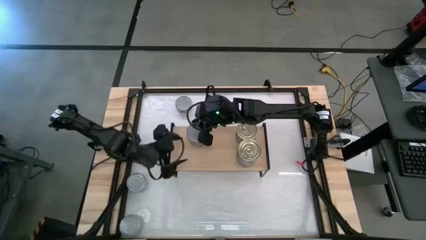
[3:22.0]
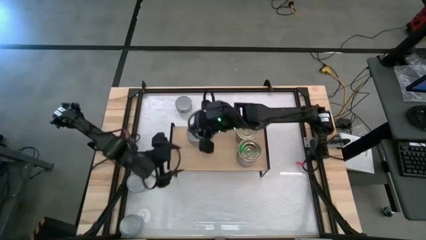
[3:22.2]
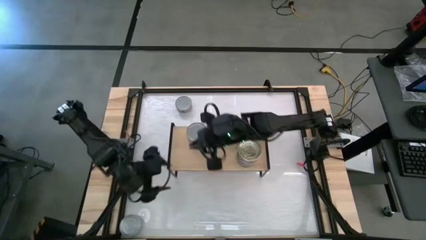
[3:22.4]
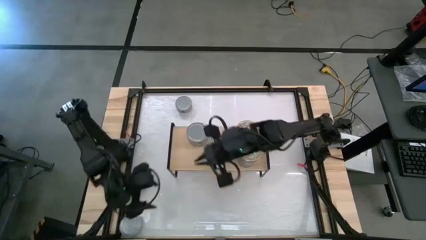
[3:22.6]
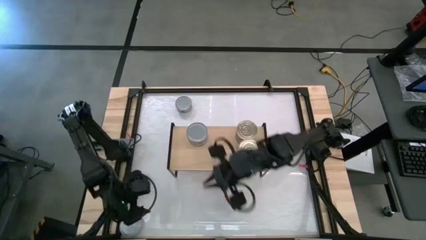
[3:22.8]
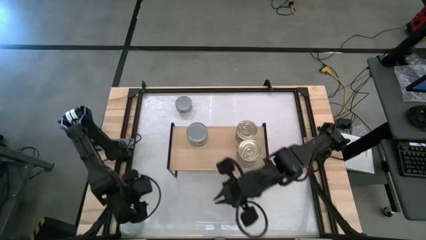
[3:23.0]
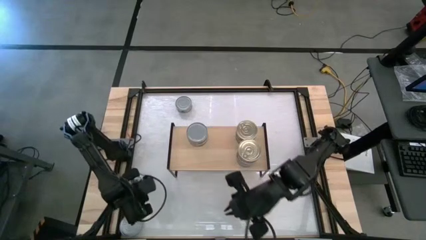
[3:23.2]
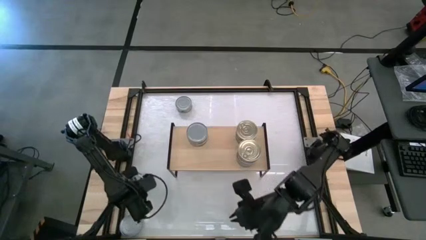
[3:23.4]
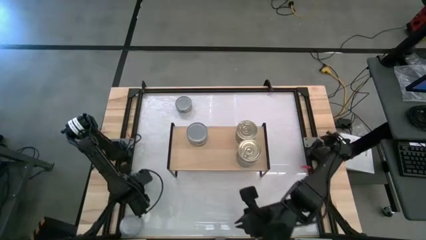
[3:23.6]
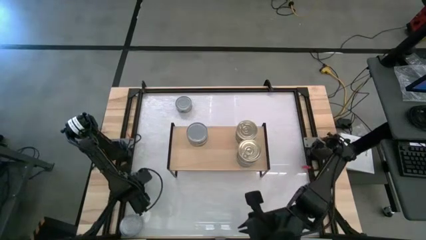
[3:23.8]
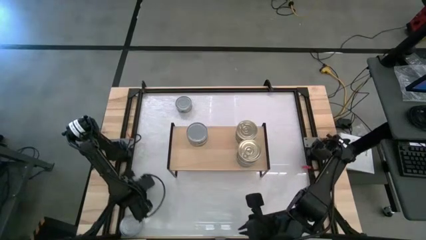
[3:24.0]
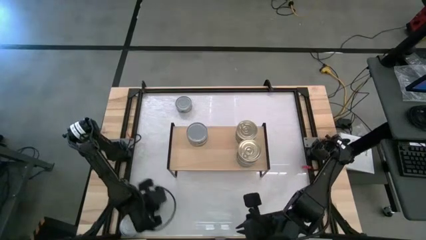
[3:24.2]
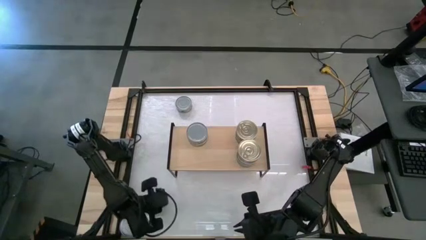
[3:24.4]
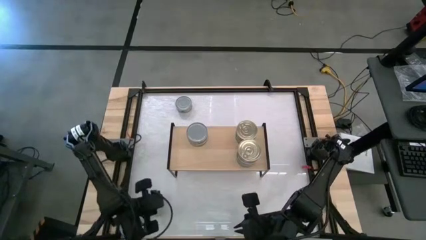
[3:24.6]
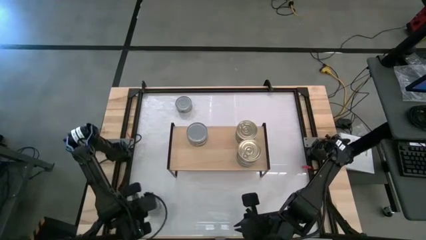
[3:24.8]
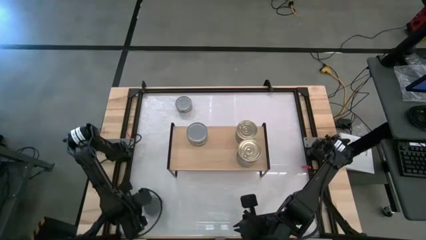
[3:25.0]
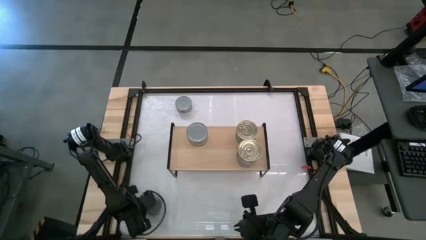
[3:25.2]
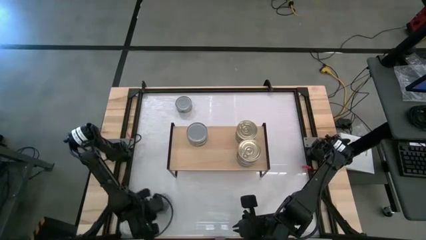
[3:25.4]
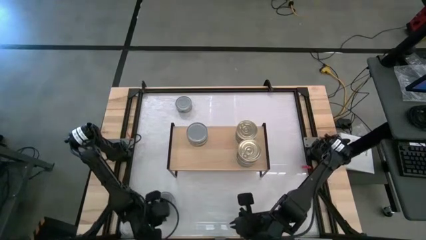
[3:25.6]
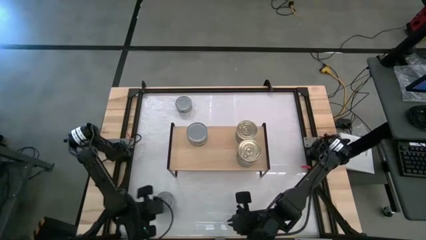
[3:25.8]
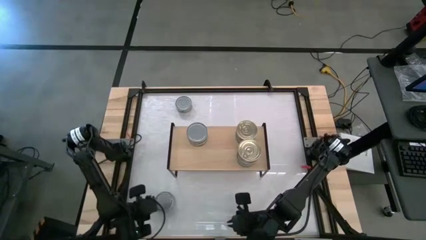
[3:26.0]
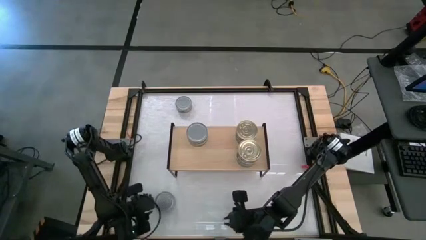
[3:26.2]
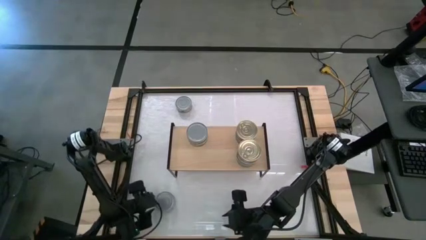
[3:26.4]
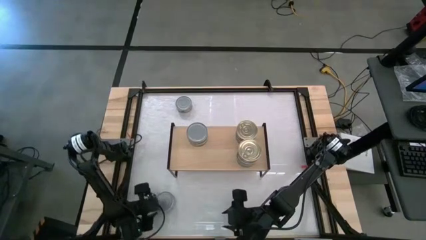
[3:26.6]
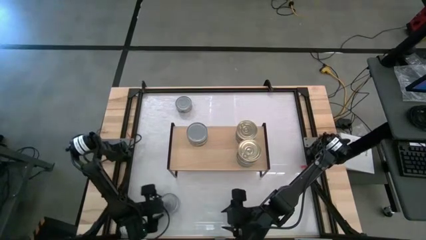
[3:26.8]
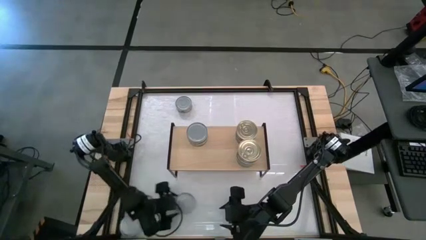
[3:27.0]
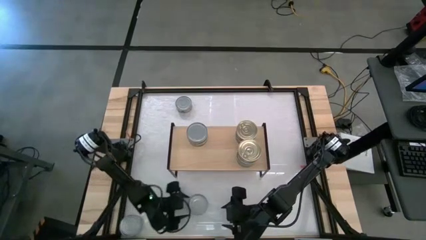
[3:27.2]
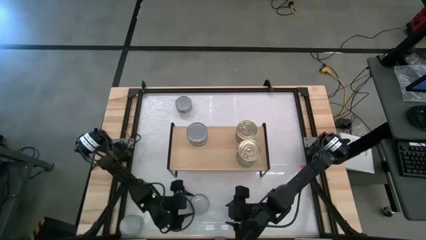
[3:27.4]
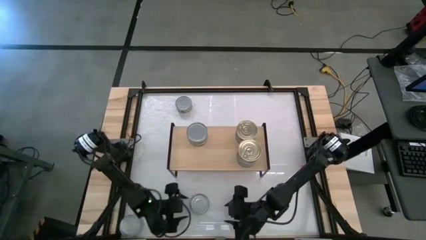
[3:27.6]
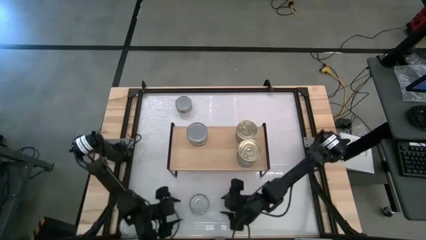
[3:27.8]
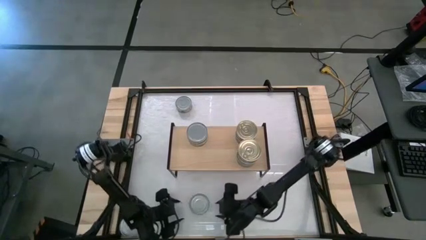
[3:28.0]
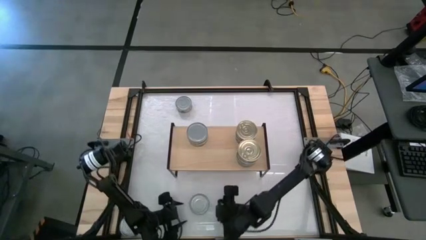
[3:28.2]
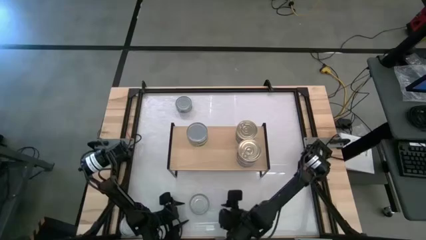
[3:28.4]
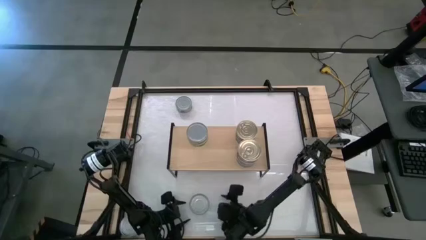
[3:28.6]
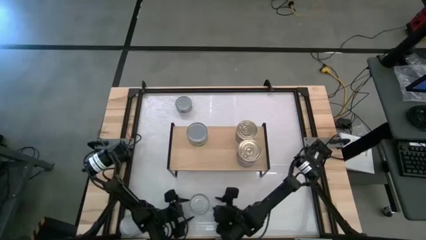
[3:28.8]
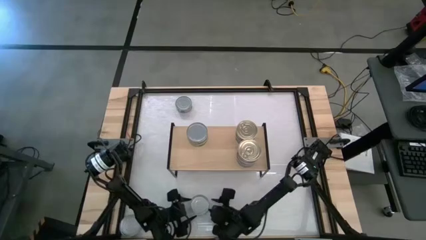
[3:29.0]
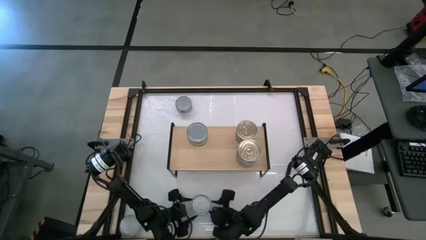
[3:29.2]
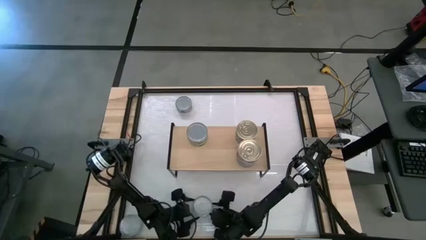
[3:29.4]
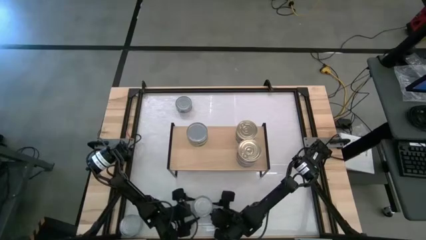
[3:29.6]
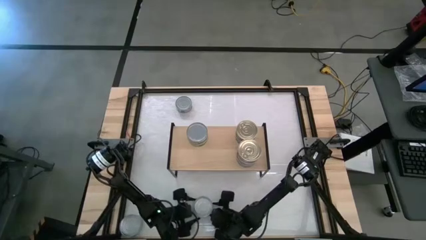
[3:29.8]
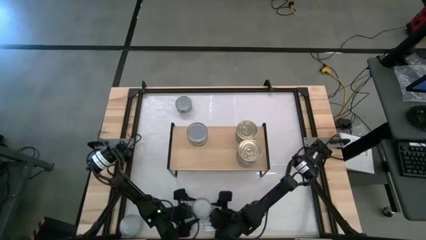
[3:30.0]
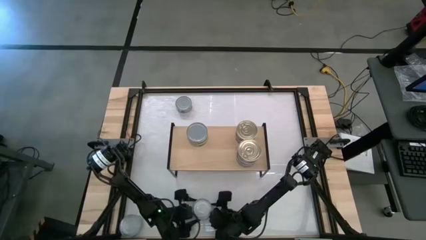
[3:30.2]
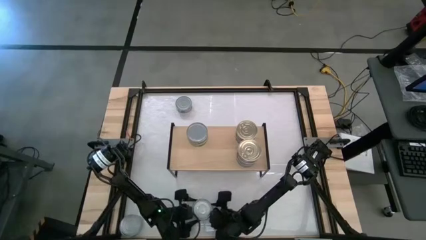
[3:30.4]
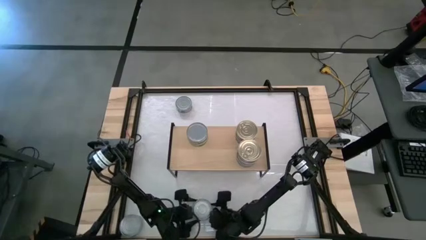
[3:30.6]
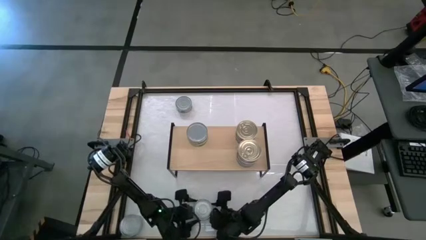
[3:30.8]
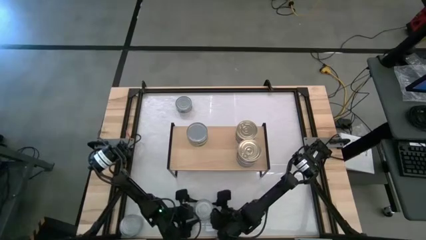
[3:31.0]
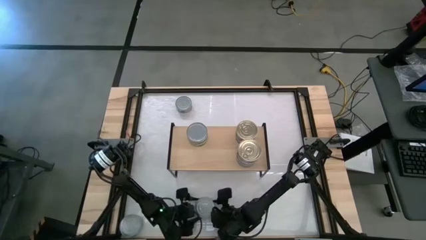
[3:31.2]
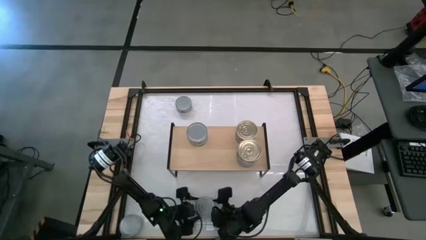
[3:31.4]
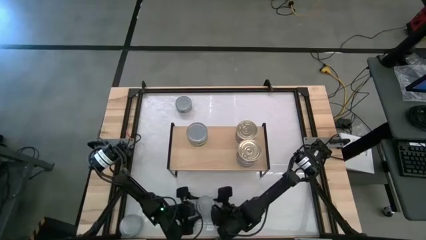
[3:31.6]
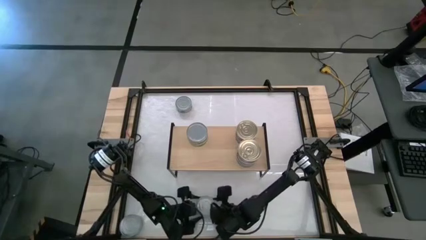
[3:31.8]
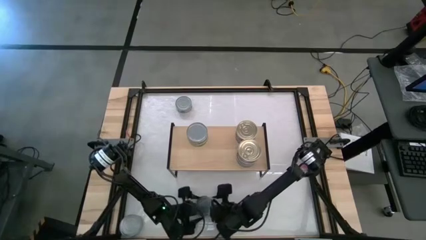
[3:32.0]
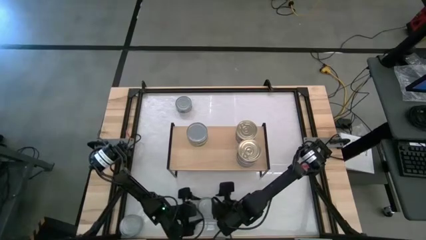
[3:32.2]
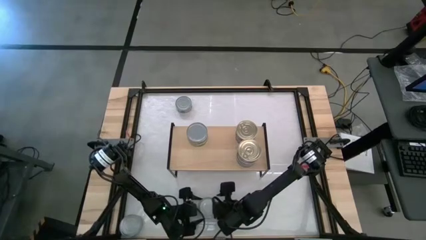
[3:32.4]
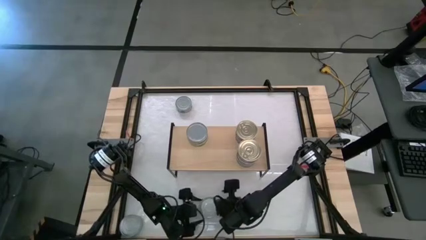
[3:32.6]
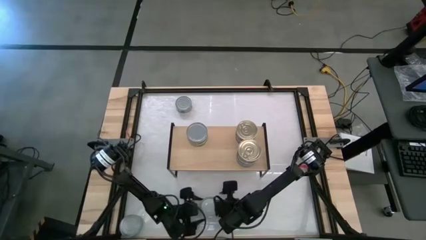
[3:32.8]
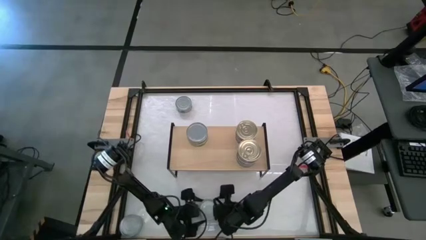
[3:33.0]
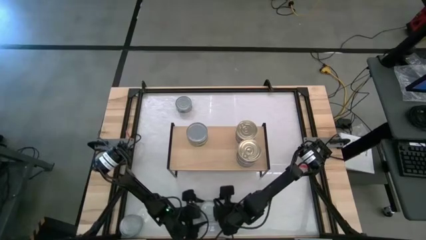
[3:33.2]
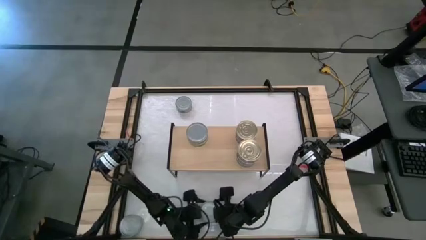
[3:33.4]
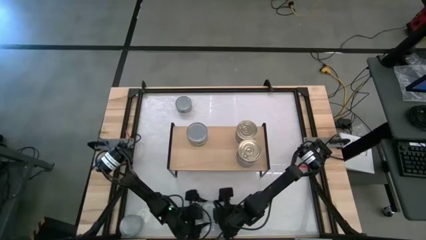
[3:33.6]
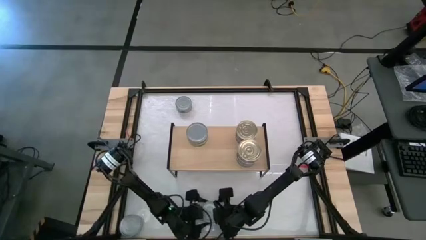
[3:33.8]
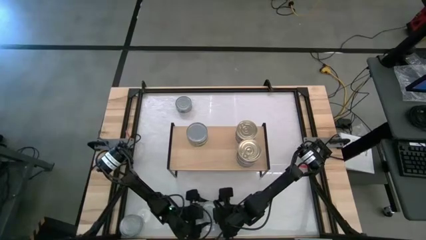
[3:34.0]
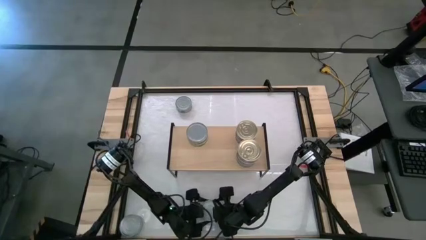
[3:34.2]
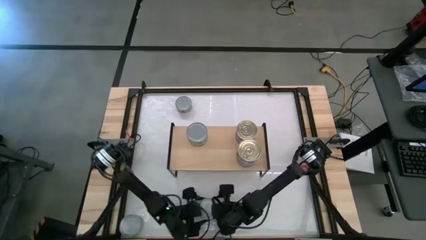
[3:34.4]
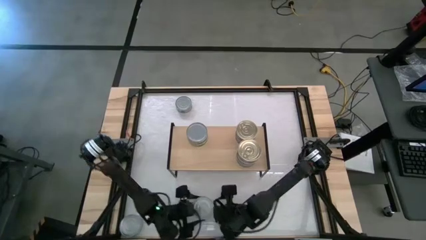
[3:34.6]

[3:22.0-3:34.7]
Task: Stack canned seafood by type on shelf
Put the green tuna can on the shelf
